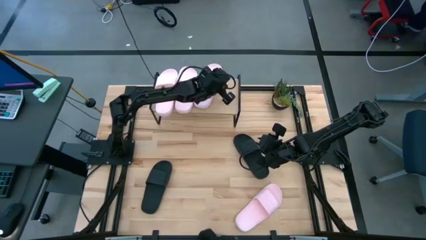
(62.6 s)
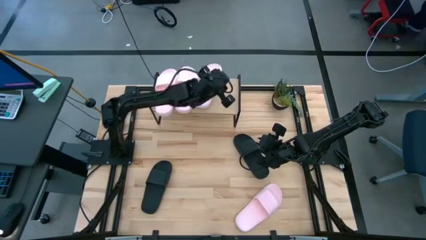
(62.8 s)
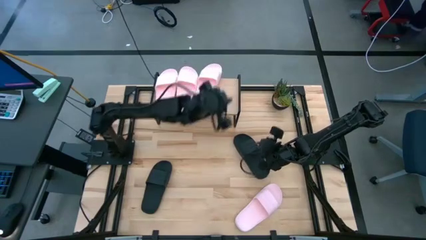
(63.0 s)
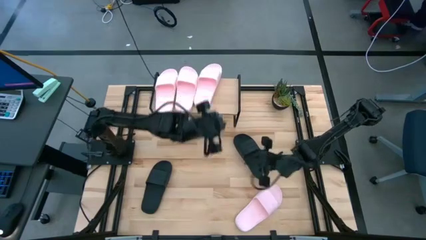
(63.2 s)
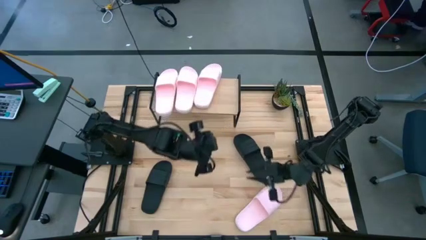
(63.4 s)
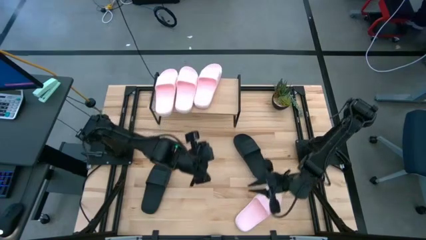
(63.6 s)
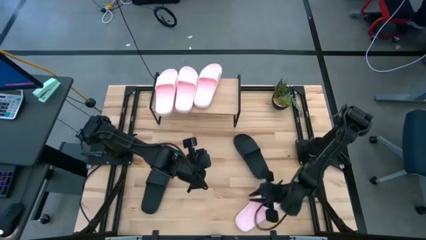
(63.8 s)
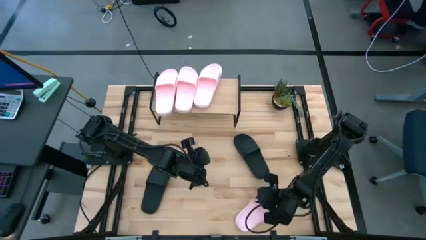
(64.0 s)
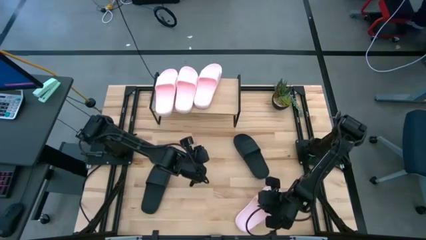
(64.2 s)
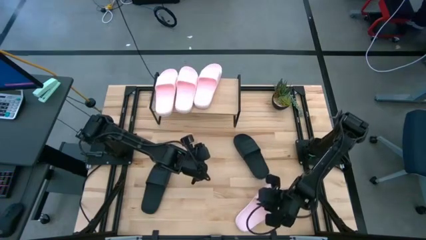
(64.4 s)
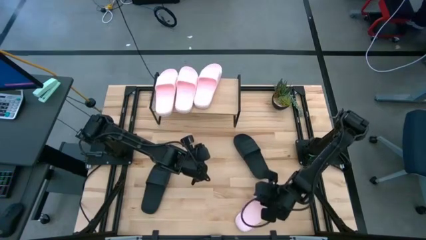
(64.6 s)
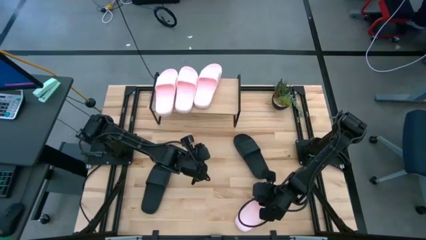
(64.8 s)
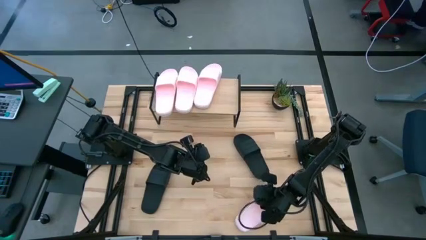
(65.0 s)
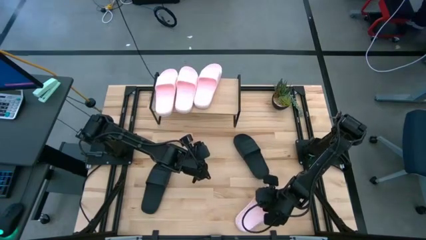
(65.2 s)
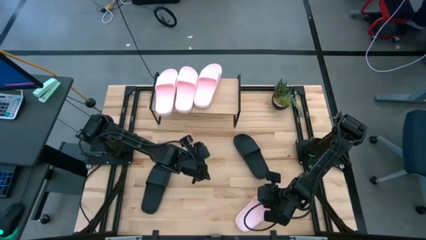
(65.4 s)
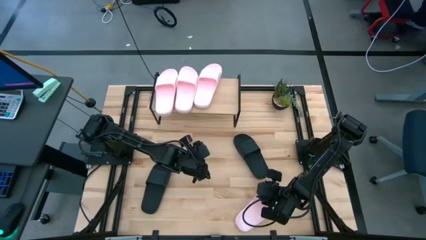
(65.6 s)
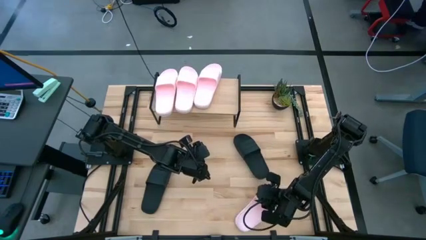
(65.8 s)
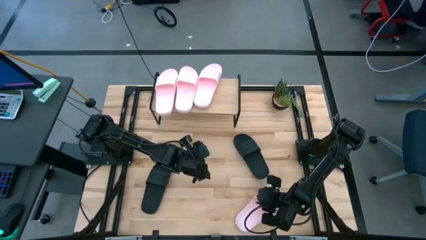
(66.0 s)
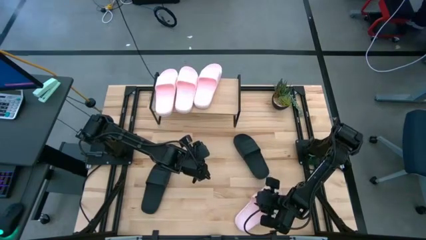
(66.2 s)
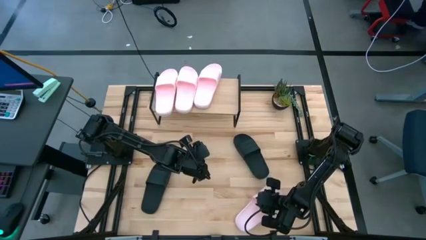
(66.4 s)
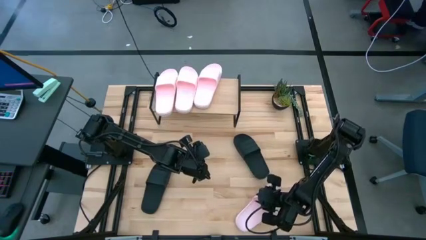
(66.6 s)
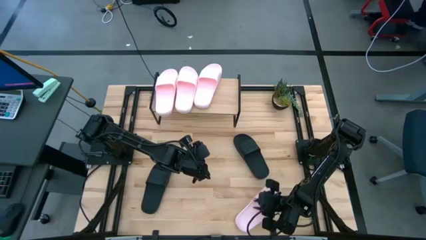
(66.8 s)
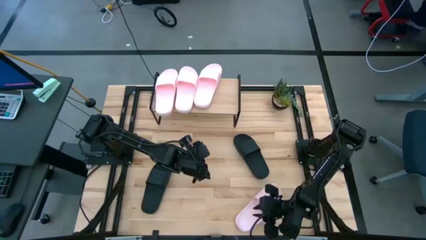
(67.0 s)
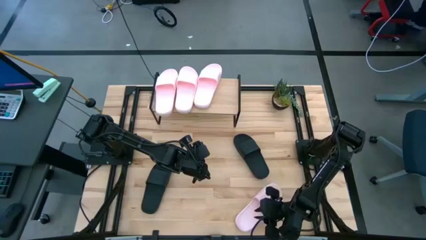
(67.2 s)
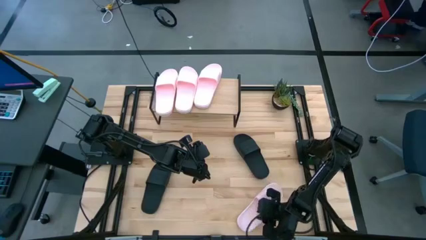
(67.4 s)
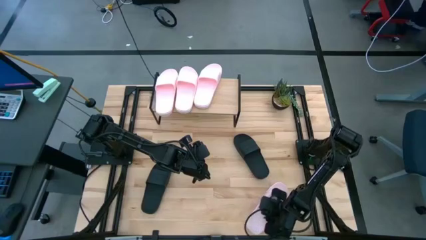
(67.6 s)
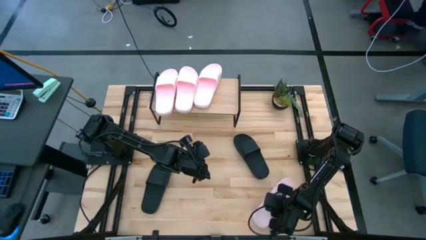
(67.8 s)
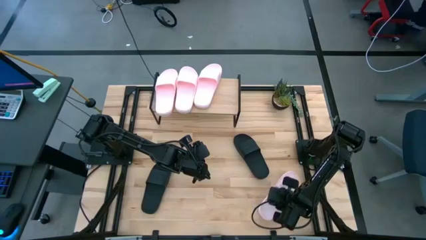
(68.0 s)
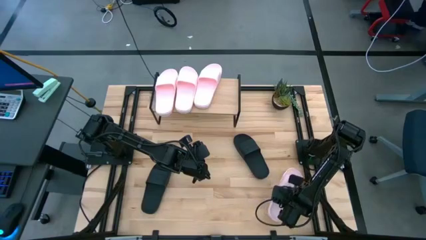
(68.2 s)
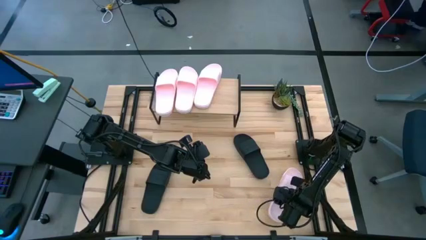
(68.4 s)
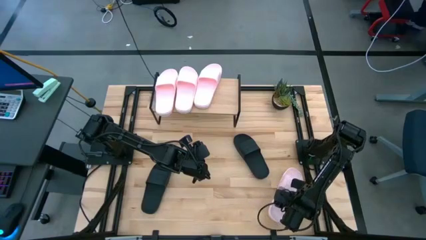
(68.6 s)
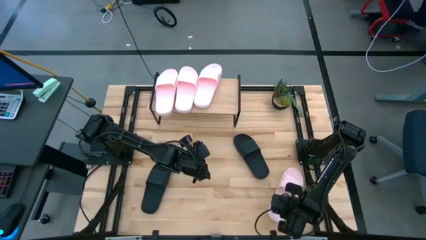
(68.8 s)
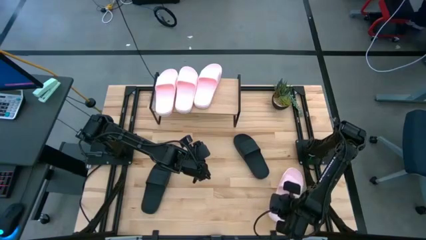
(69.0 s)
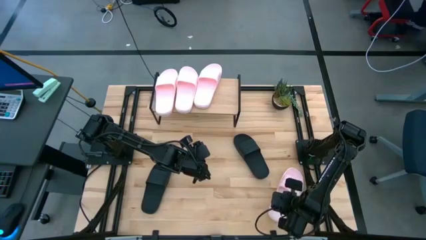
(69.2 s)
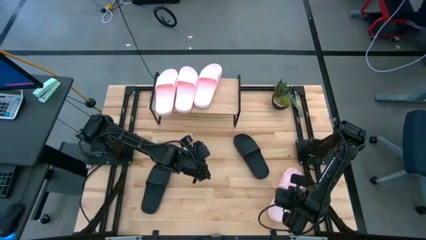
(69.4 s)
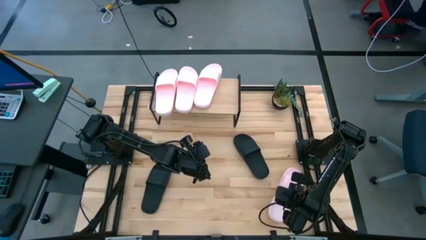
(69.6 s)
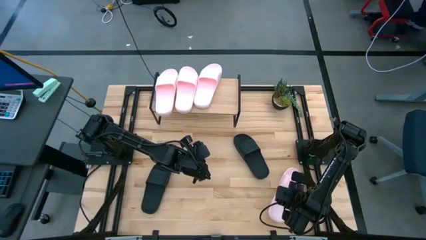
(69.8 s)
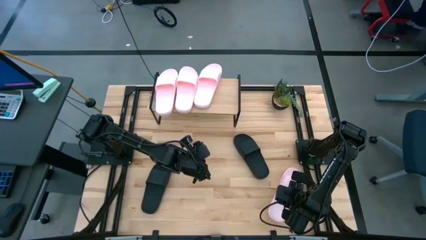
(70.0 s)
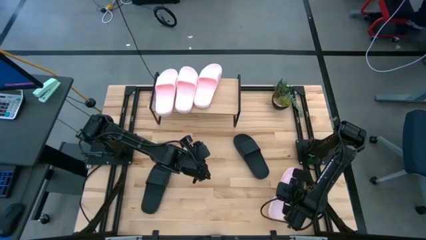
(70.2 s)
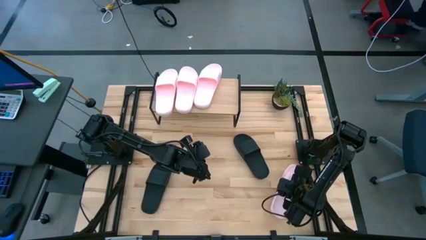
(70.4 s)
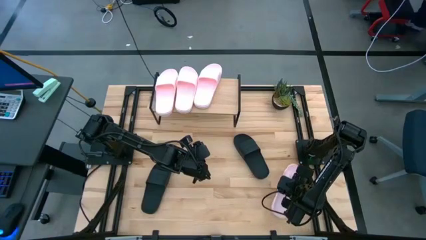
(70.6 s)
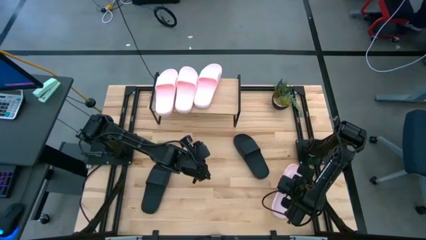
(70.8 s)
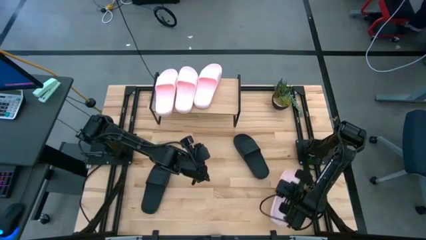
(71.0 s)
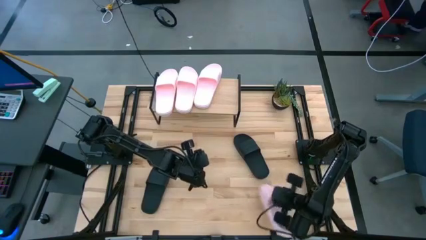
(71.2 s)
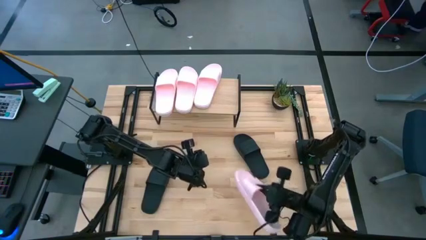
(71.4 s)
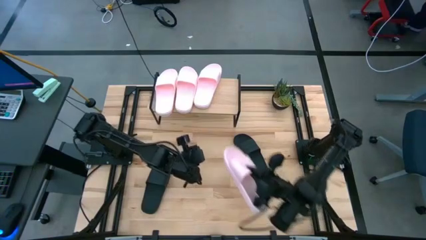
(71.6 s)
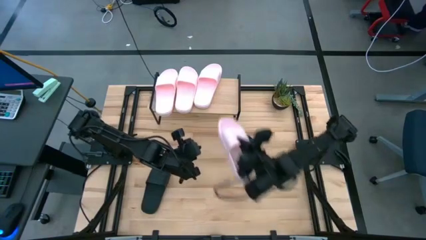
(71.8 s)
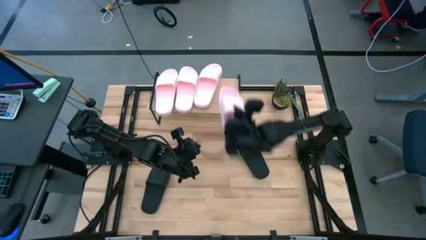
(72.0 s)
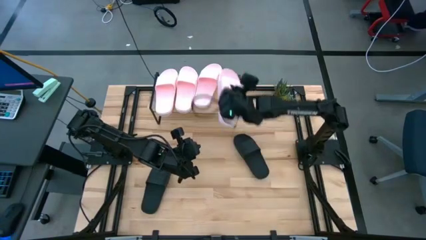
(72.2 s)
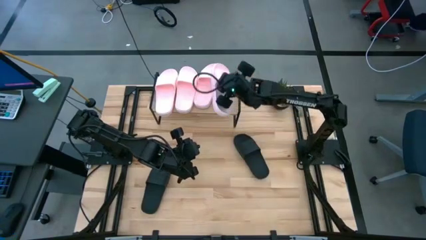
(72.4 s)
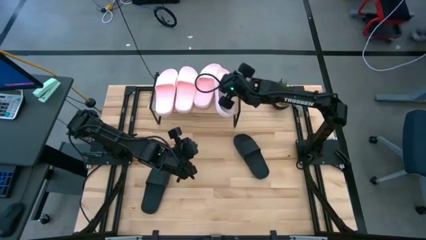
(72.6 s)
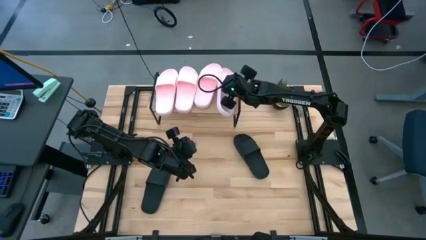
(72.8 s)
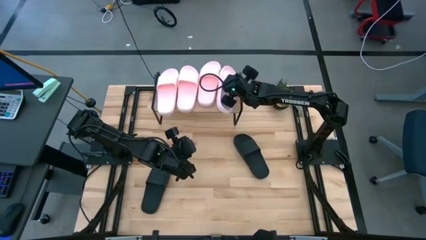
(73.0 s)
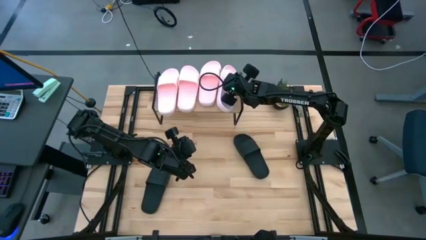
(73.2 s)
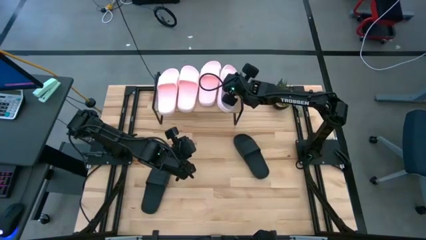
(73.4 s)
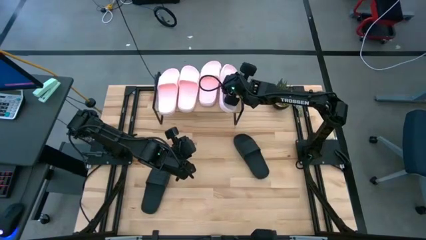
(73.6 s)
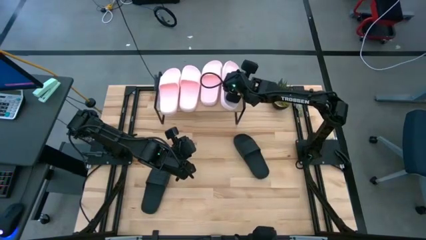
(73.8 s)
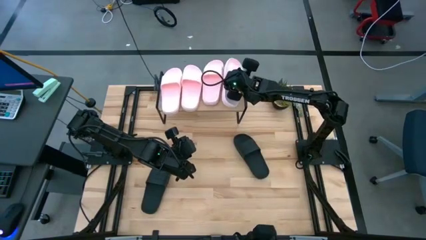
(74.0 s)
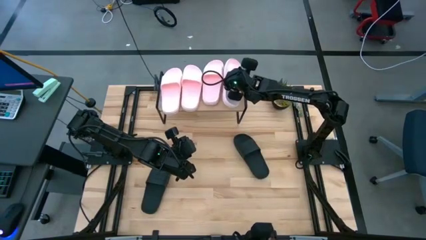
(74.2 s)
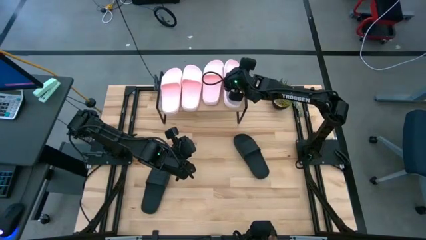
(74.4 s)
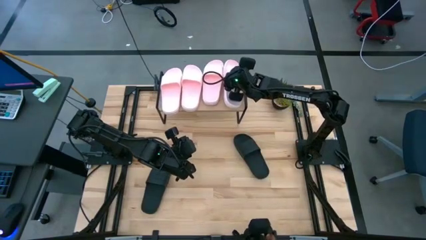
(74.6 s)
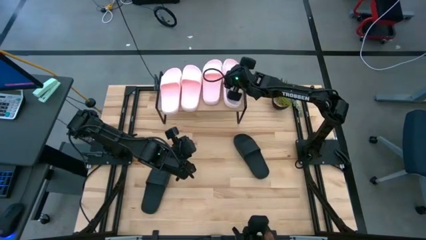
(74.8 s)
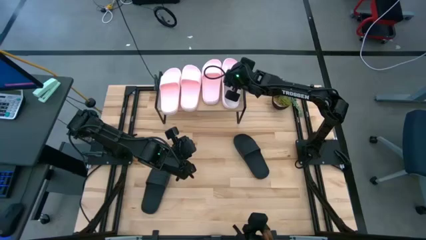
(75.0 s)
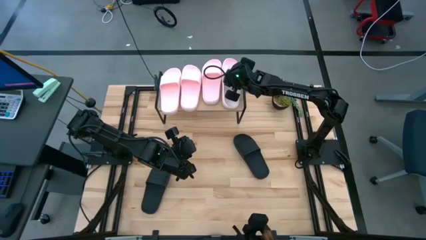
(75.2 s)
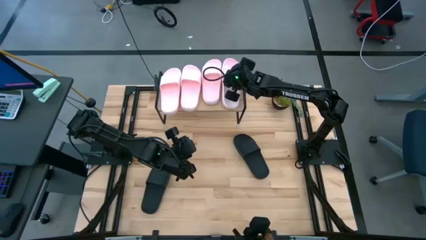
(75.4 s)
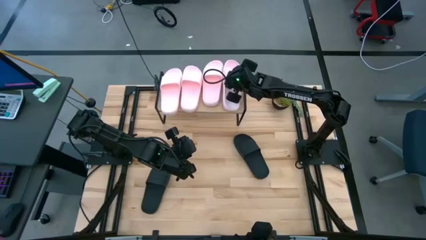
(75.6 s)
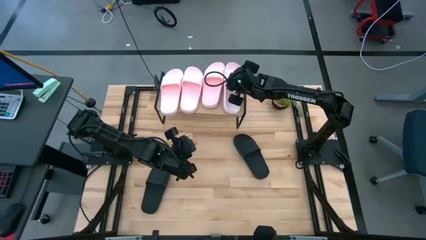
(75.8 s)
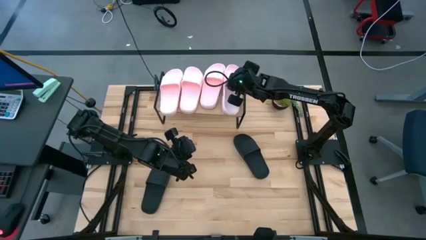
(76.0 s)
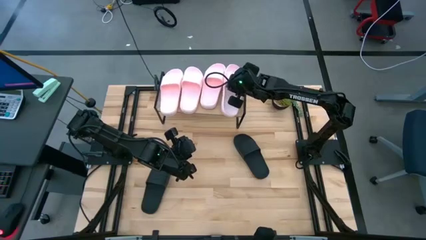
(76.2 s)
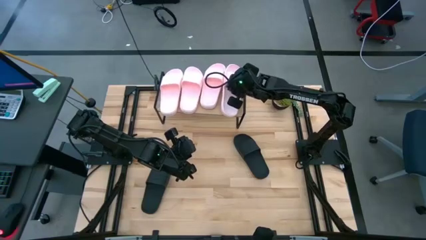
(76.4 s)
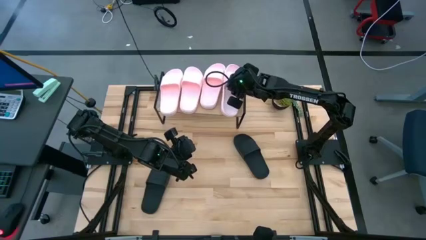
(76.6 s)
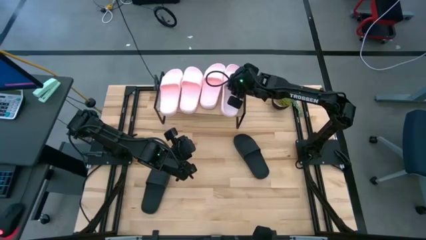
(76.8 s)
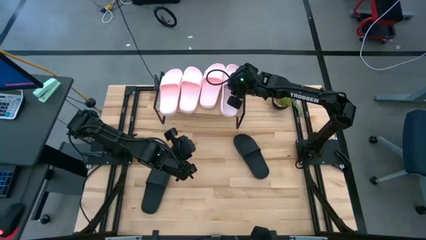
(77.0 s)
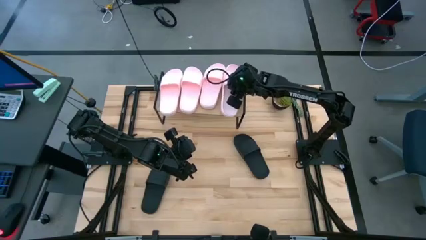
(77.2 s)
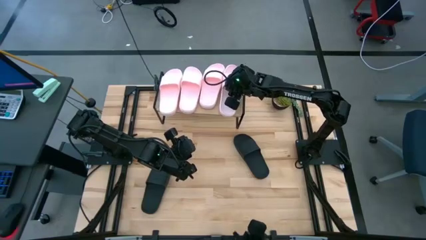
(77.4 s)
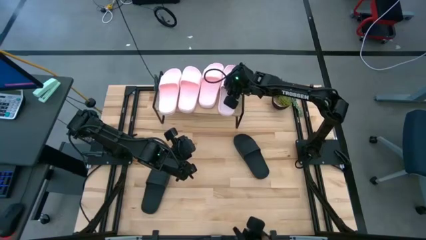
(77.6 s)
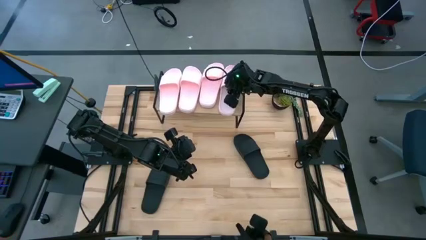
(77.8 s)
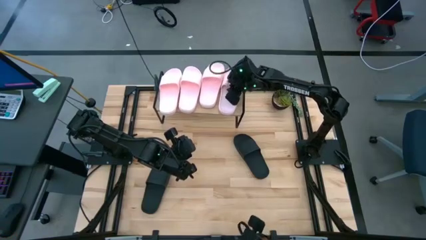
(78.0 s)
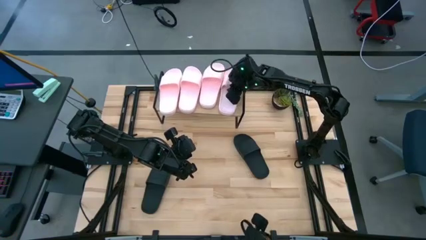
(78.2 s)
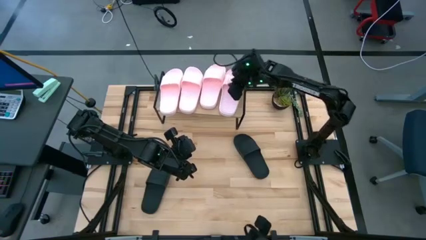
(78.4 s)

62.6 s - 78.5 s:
Task: Pick and place slides into the shelf
Put the pink slide on the shelf

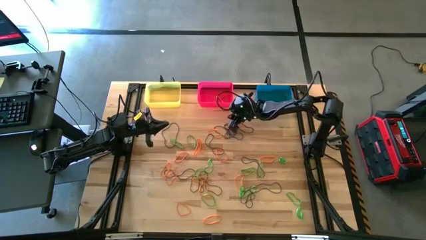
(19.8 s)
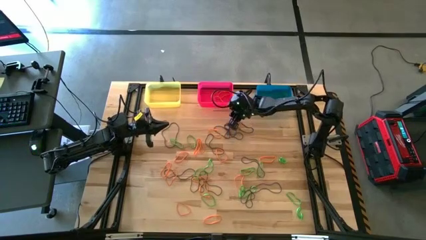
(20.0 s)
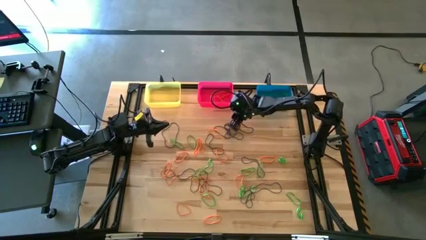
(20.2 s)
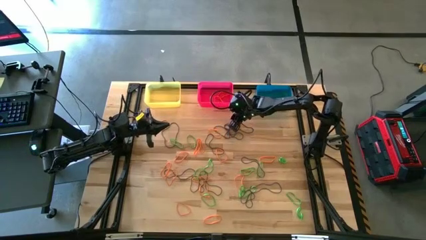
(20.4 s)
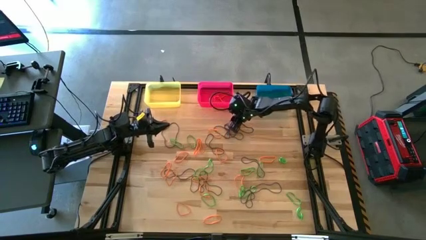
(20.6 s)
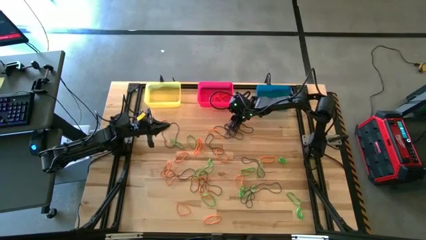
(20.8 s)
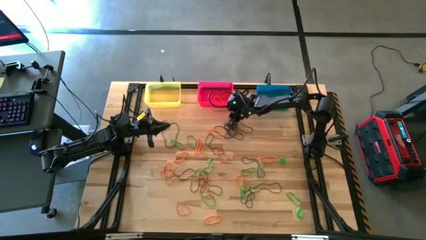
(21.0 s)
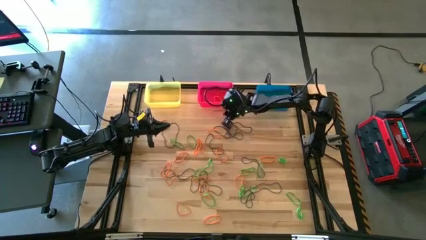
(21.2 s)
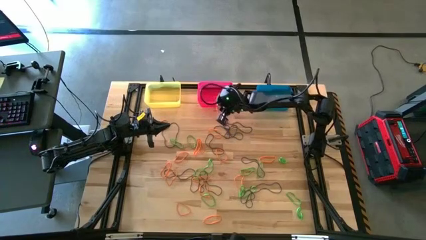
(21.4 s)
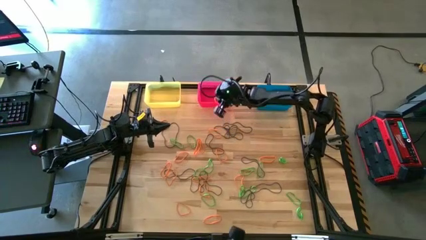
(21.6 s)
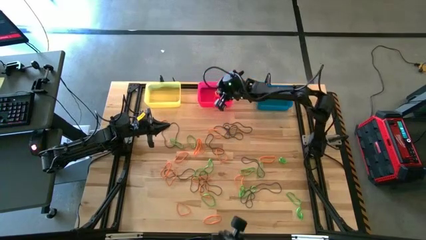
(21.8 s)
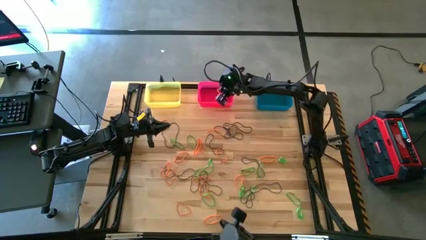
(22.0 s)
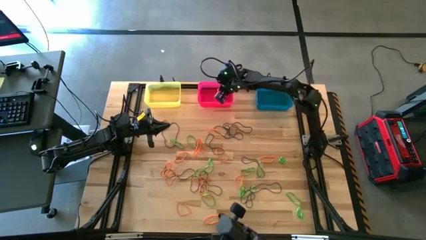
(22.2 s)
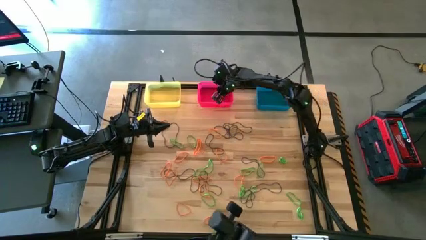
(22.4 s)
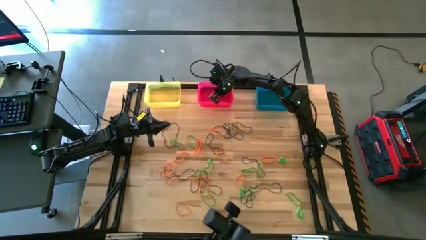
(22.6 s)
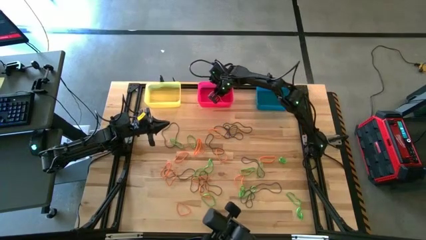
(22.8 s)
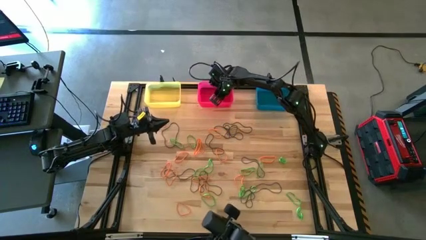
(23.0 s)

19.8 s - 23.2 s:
Task: Sort rubber bands into baskets
Put the orange rubber band into the pink bin
